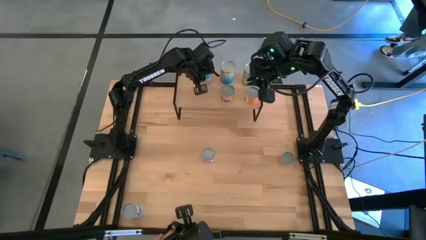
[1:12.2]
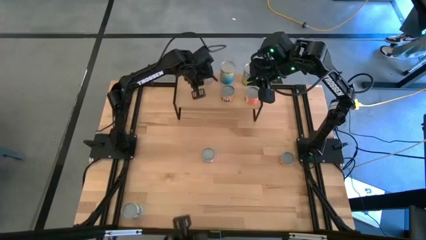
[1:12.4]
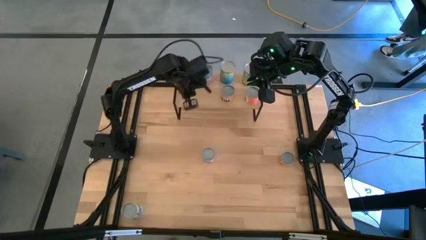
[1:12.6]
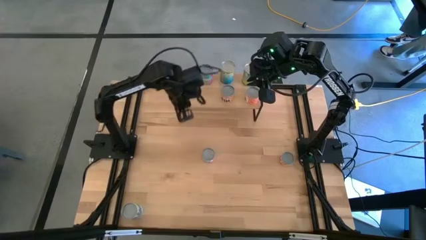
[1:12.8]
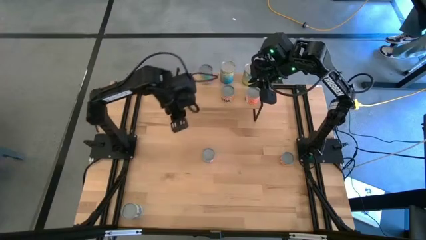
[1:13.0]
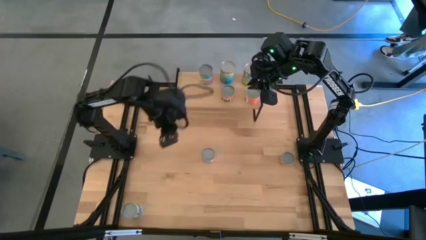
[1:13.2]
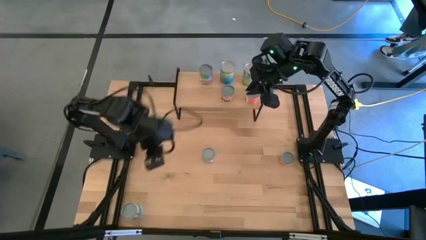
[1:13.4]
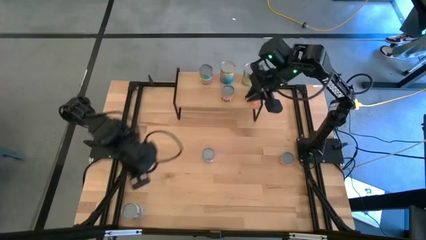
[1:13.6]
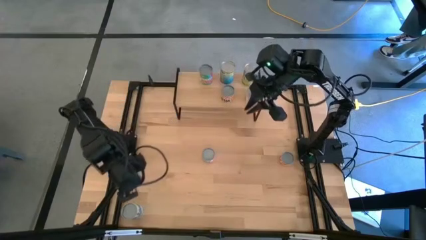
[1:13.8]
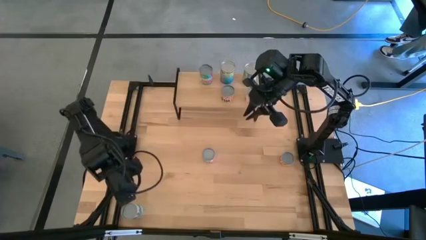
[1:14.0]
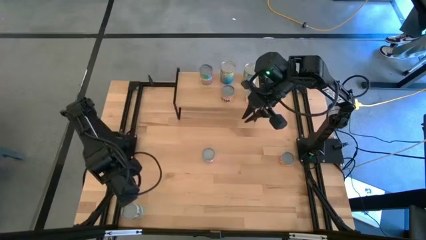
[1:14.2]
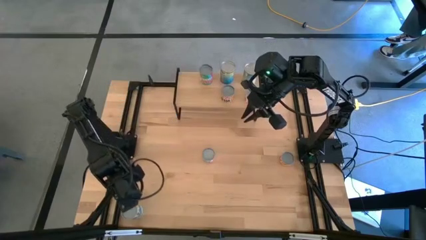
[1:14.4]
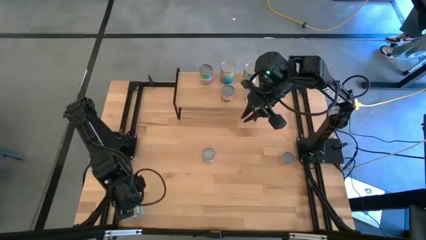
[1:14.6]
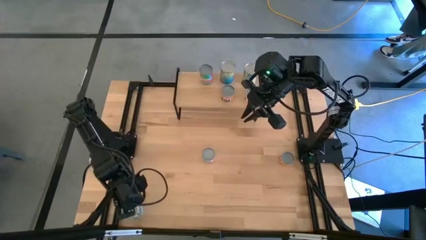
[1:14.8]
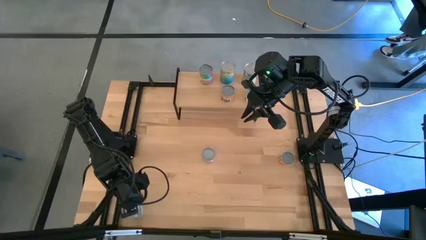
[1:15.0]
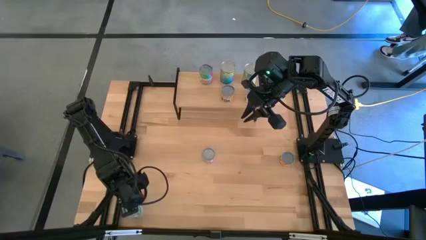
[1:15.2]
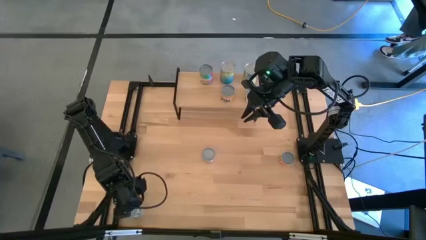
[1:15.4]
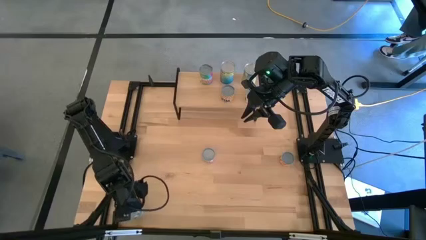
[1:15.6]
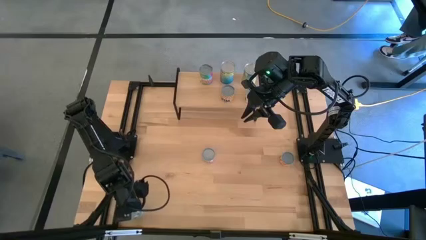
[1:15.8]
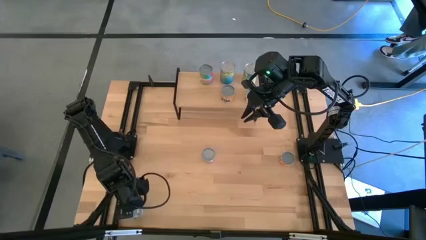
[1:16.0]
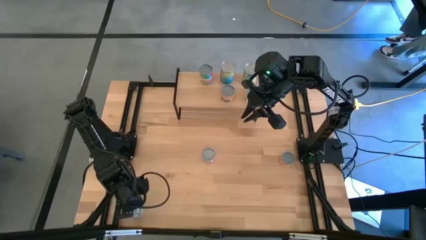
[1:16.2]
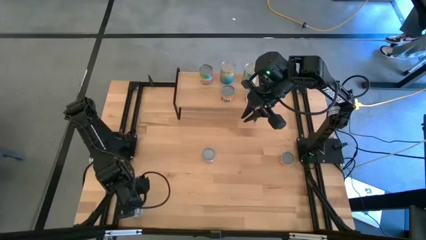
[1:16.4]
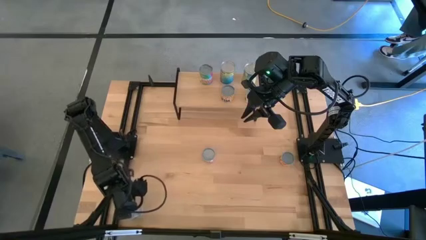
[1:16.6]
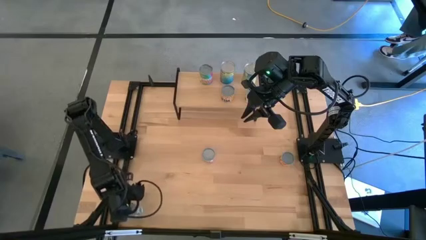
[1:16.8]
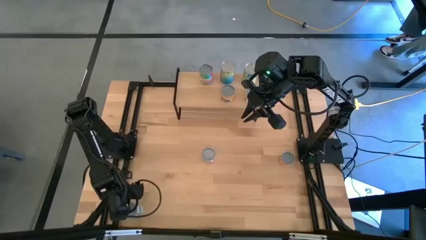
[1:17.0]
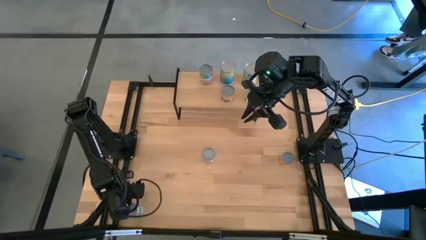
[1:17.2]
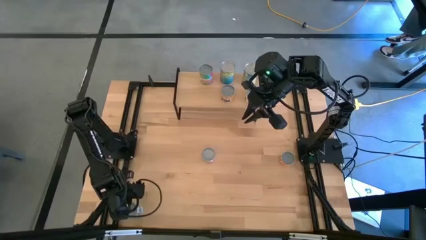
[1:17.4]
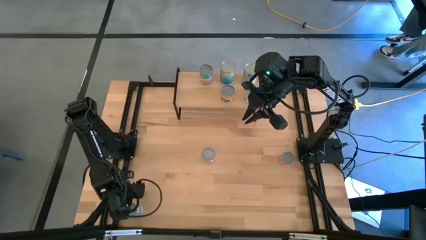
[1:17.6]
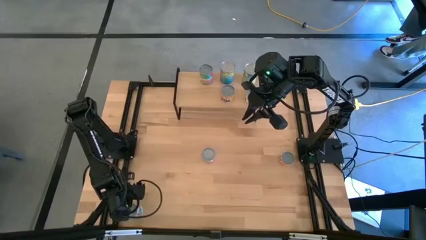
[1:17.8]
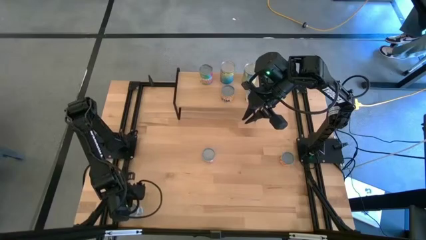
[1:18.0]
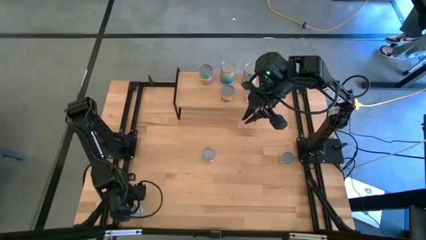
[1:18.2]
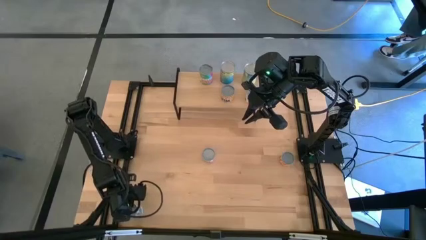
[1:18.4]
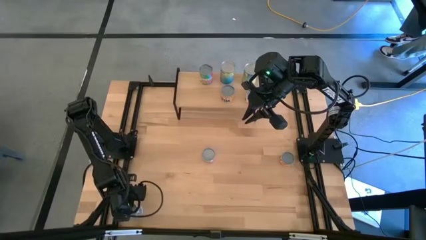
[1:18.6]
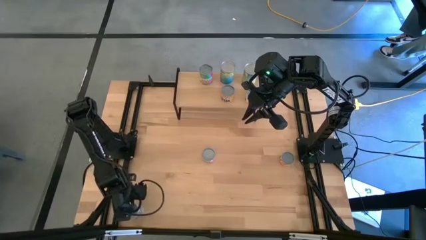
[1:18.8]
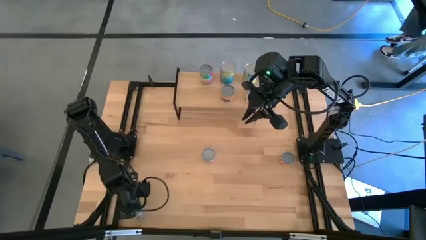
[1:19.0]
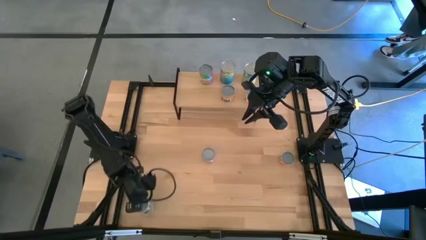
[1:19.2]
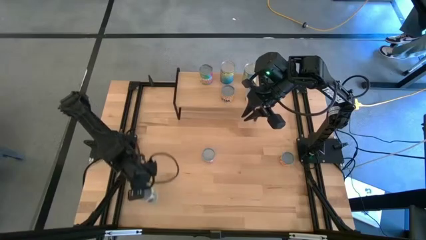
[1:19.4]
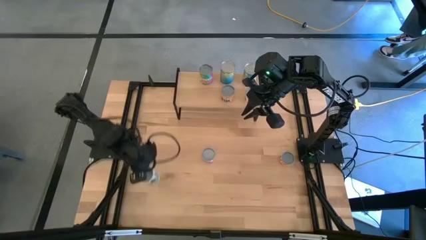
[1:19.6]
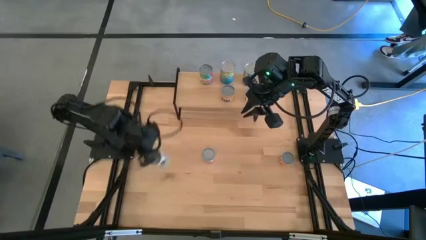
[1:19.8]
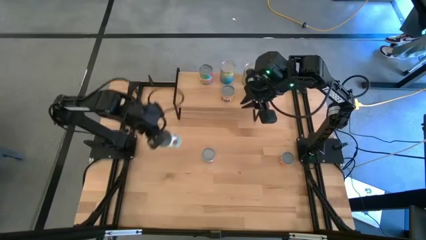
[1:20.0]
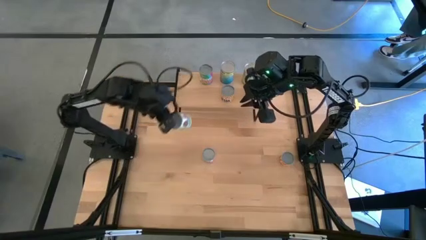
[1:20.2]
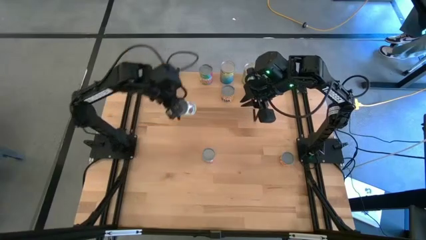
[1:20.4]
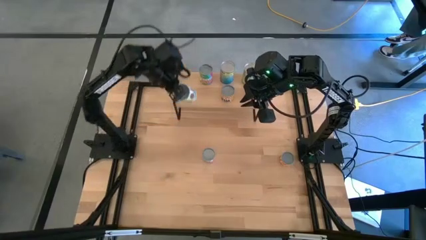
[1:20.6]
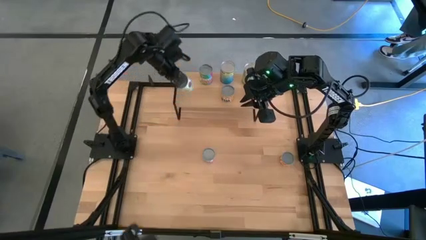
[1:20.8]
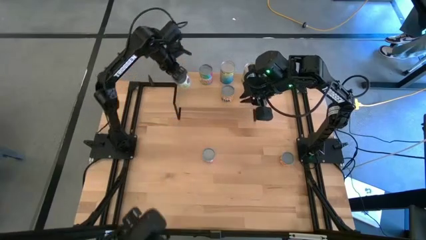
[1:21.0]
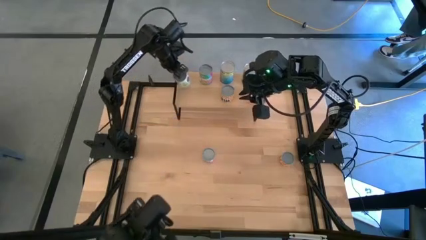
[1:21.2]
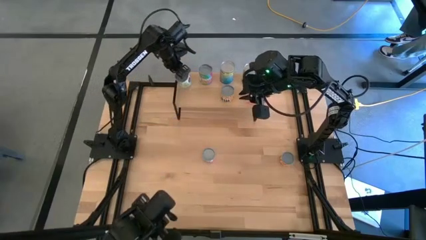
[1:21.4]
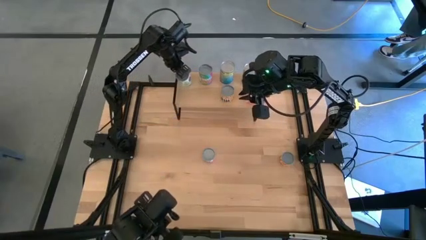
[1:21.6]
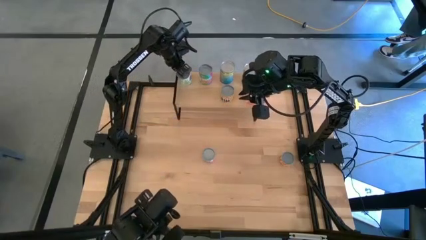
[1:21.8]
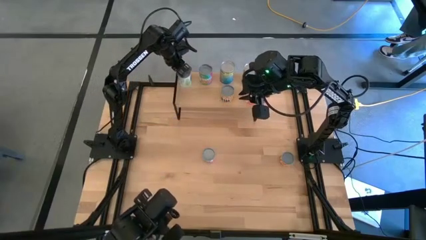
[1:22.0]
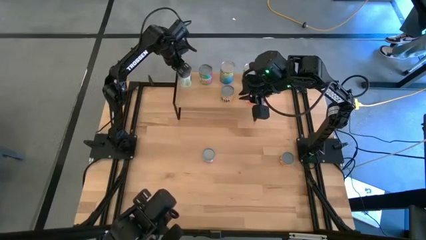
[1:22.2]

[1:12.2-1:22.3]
Task: Pick and place cans onto a shelf
Put the canned vegetables on the shelf

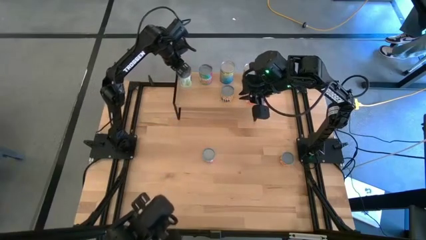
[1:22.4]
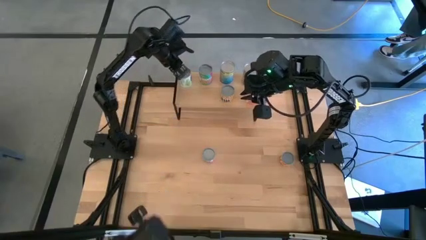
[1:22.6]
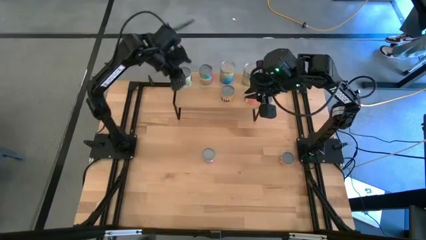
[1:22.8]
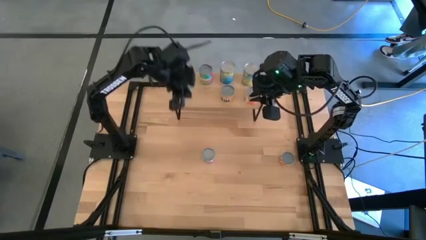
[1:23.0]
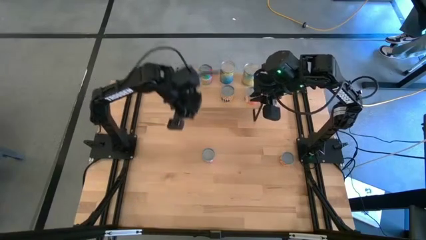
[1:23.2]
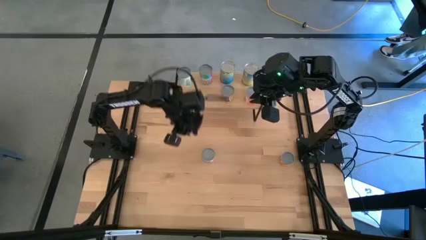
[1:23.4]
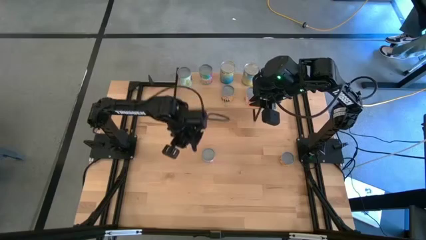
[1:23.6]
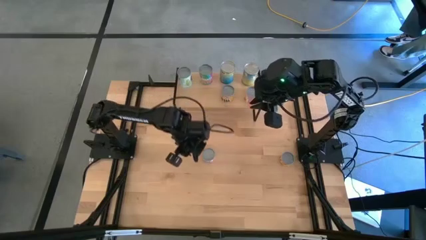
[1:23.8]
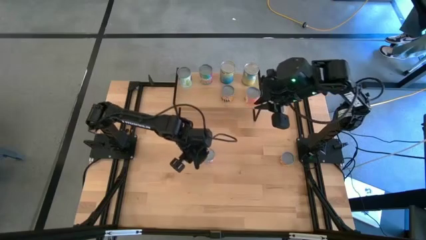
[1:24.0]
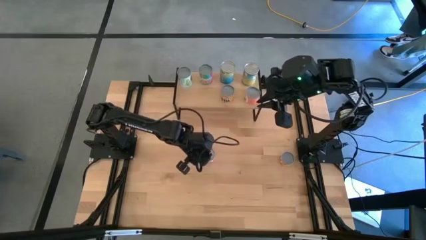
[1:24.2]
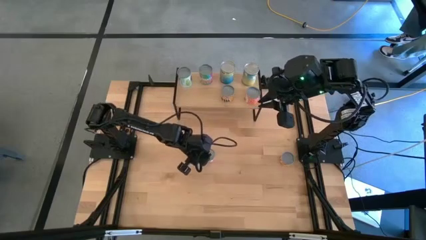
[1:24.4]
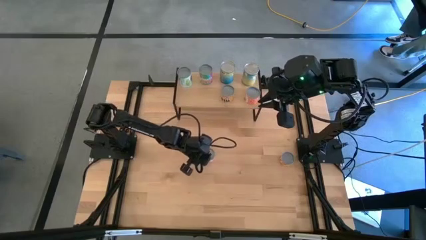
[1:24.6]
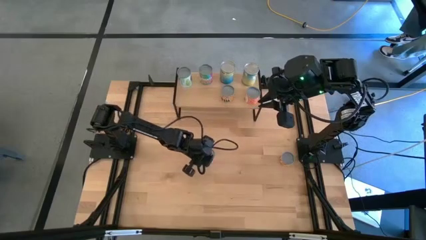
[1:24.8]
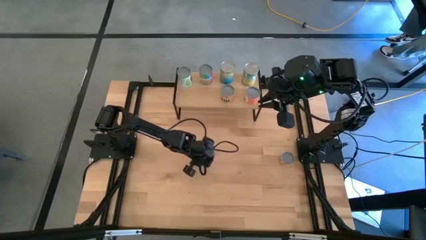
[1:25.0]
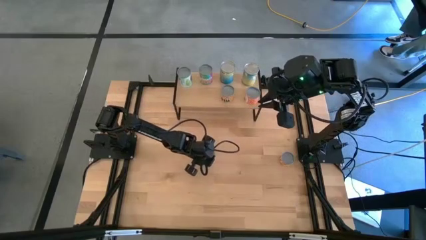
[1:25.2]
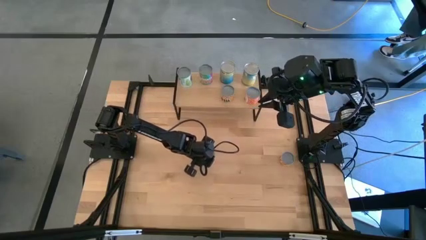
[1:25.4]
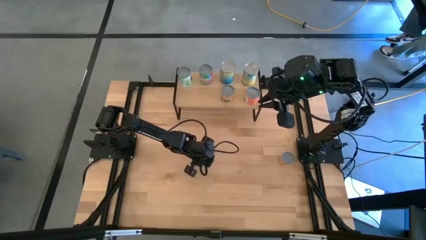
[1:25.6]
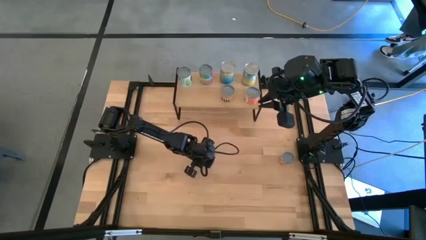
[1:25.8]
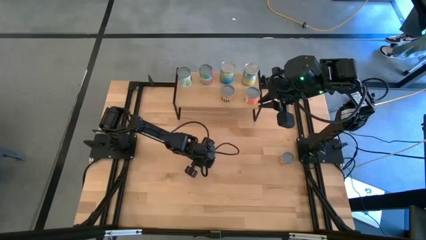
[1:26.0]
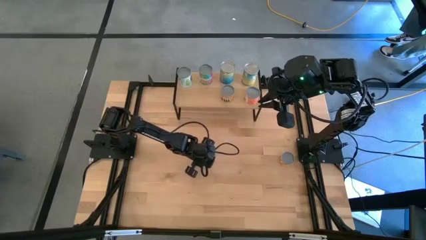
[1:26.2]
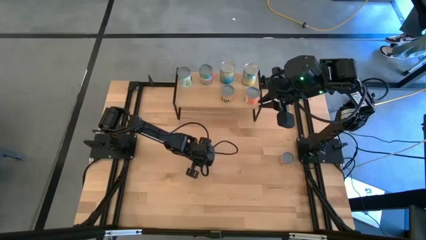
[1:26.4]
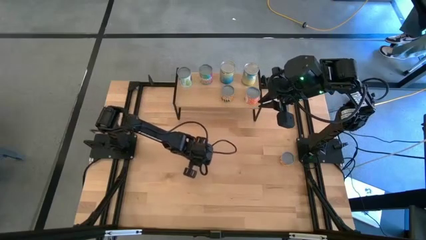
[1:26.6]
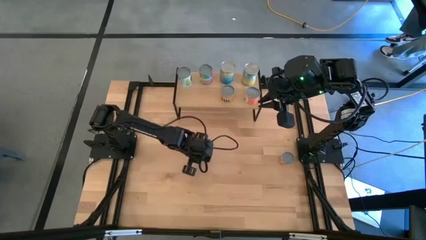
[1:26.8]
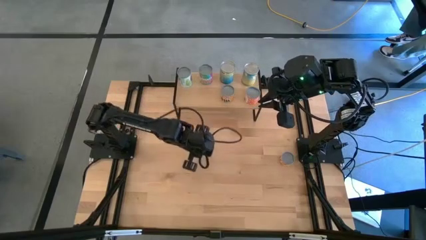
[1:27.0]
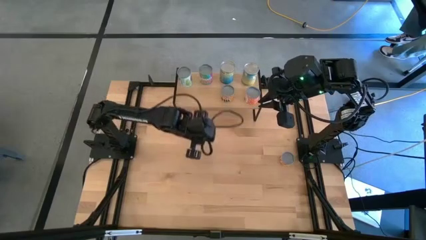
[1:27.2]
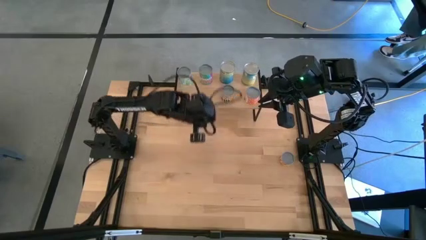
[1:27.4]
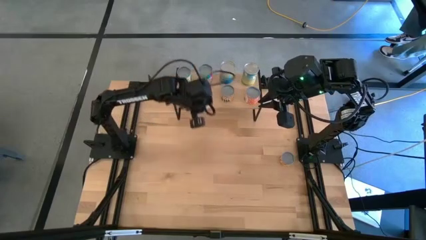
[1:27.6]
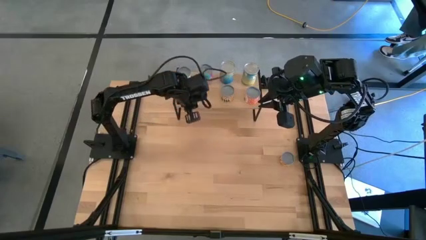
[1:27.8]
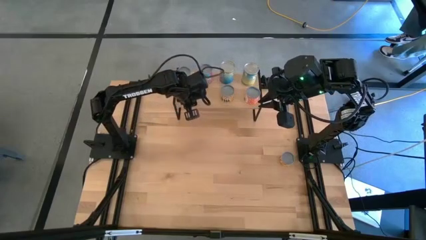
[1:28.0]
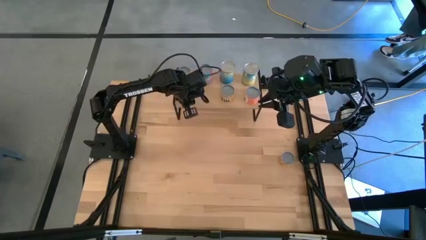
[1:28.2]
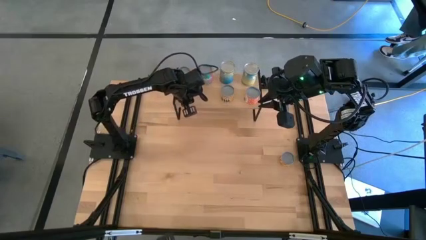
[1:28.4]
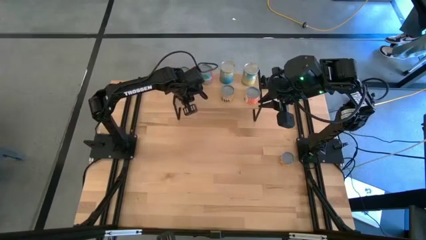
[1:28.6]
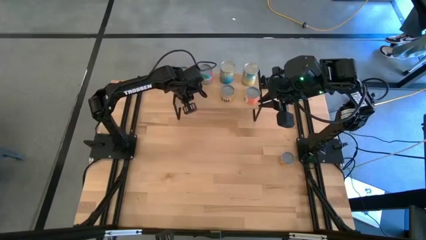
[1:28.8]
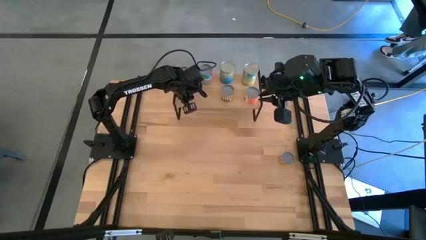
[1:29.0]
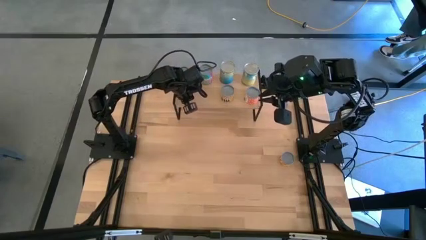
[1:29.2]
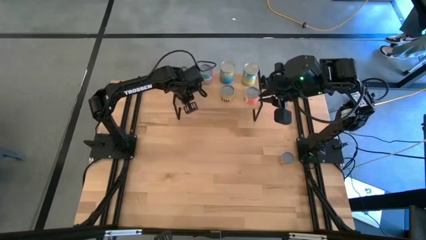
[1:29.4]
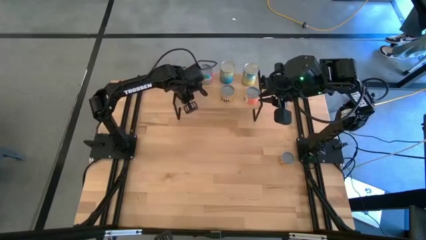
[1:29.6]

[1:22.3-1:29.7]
Put the canned salmon on the shelf
